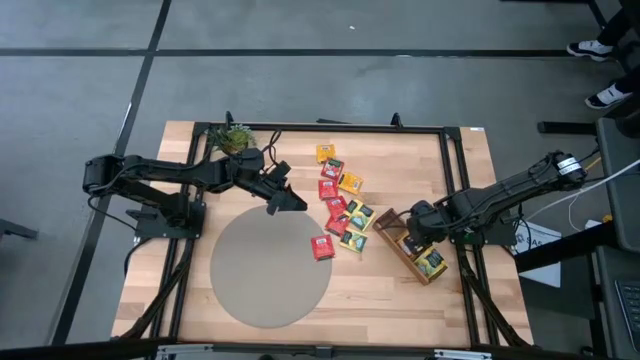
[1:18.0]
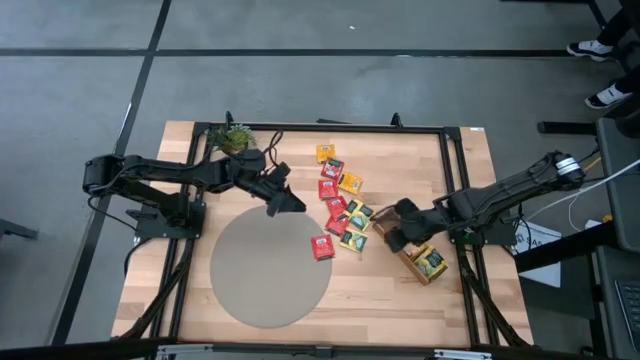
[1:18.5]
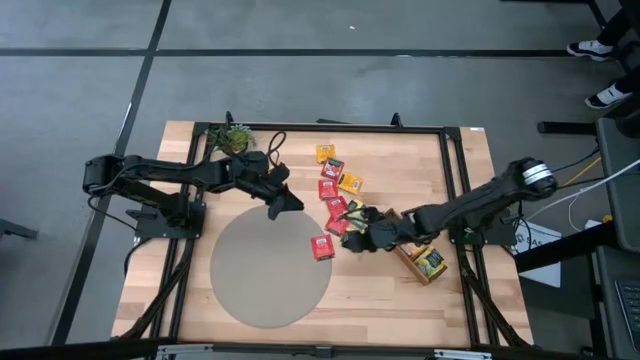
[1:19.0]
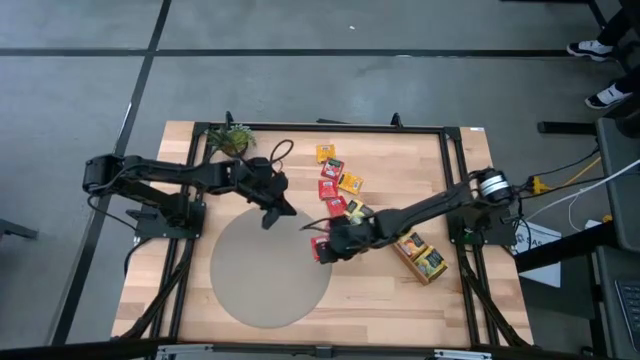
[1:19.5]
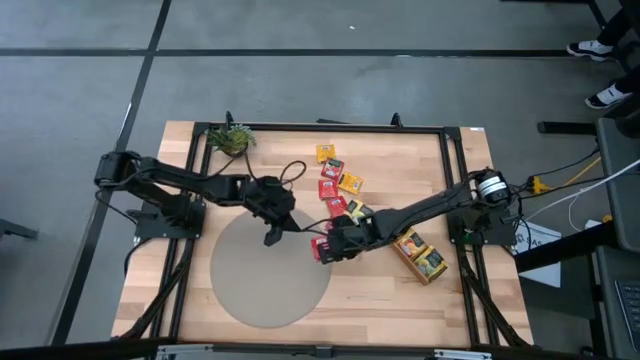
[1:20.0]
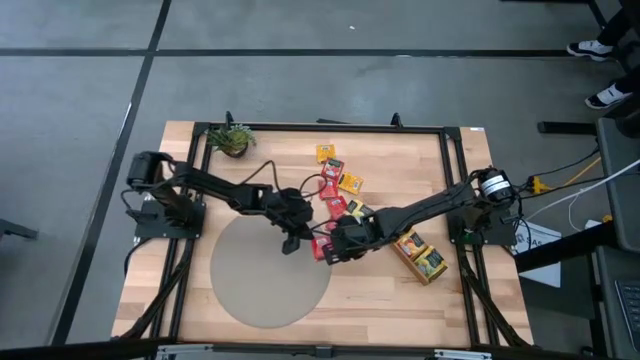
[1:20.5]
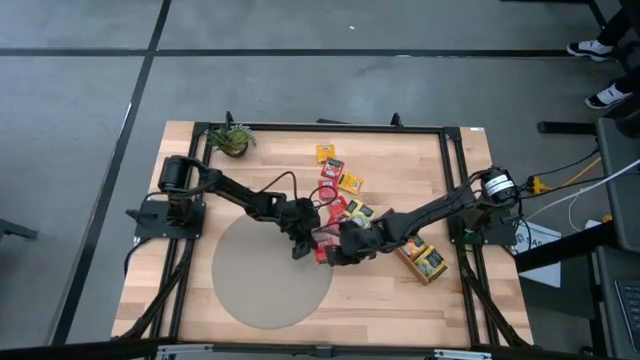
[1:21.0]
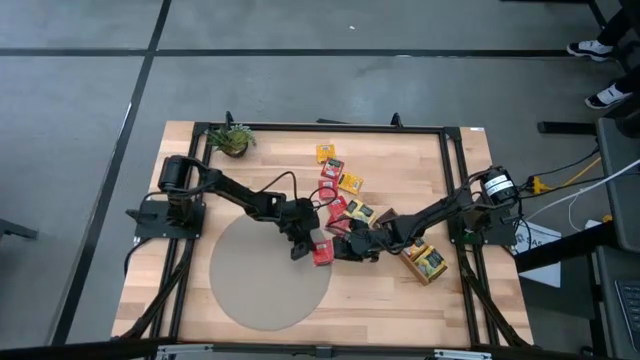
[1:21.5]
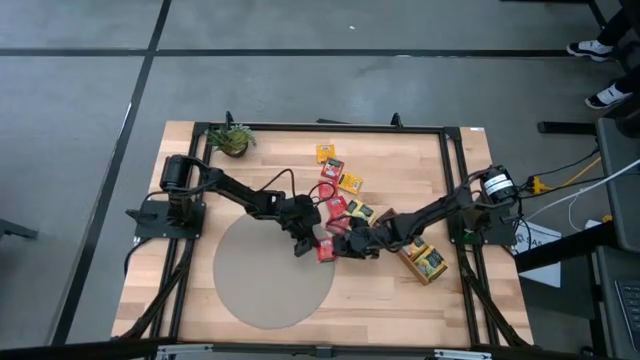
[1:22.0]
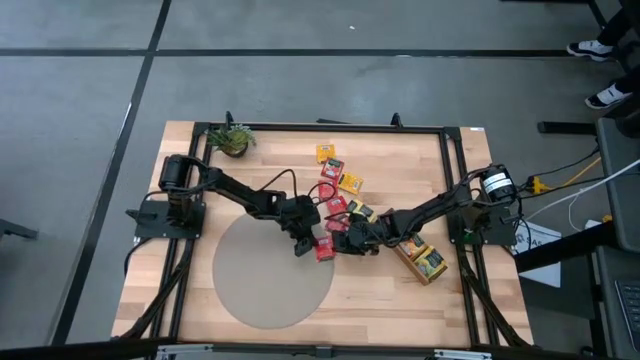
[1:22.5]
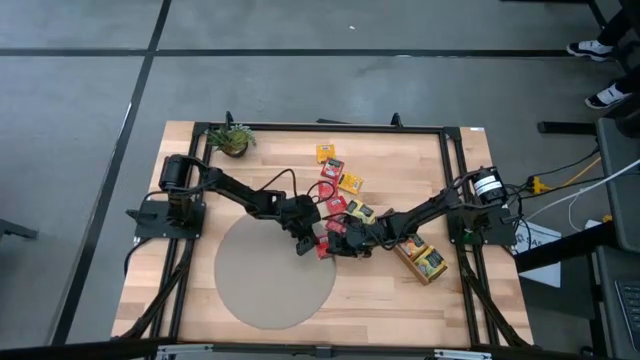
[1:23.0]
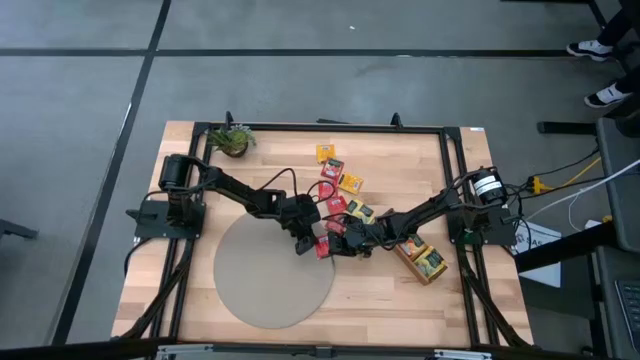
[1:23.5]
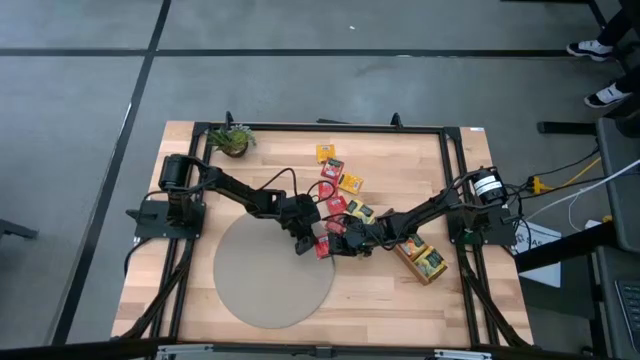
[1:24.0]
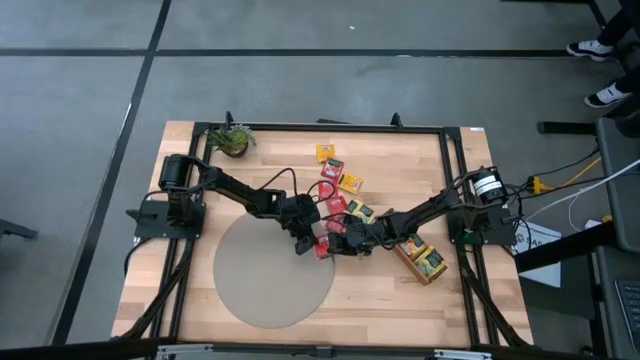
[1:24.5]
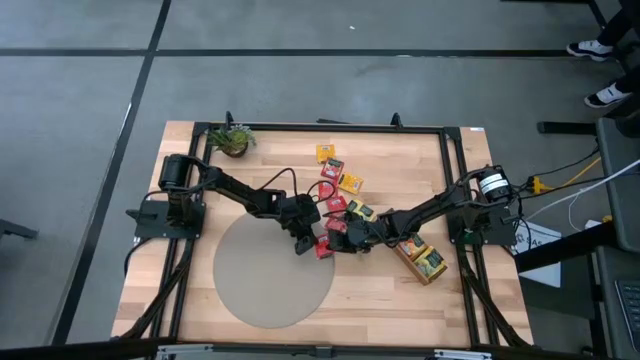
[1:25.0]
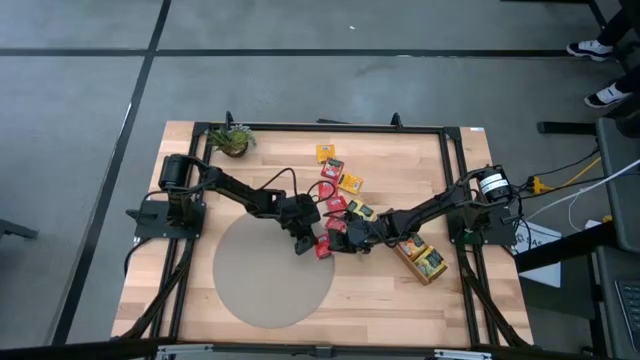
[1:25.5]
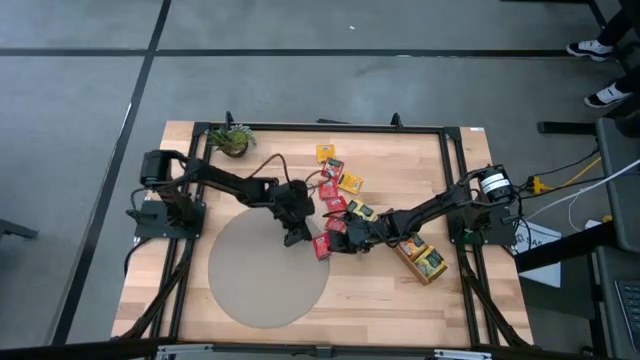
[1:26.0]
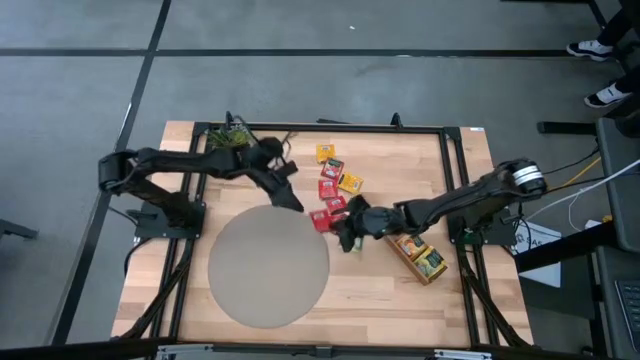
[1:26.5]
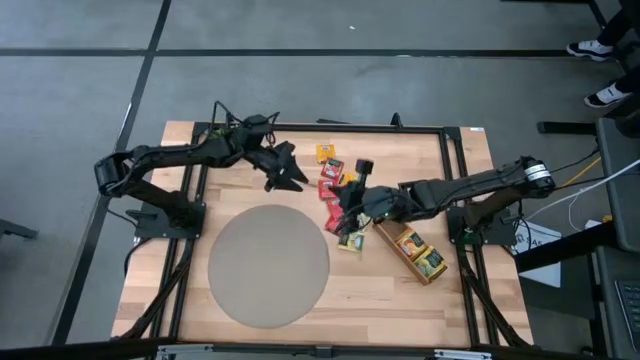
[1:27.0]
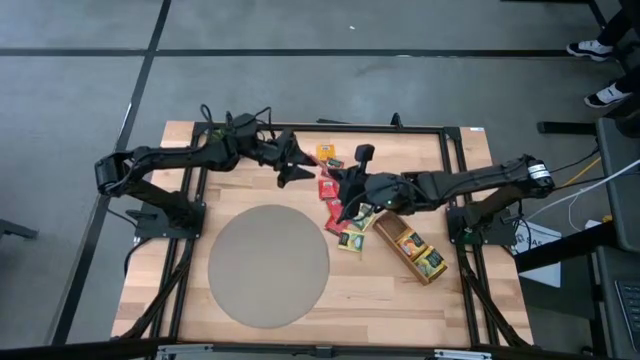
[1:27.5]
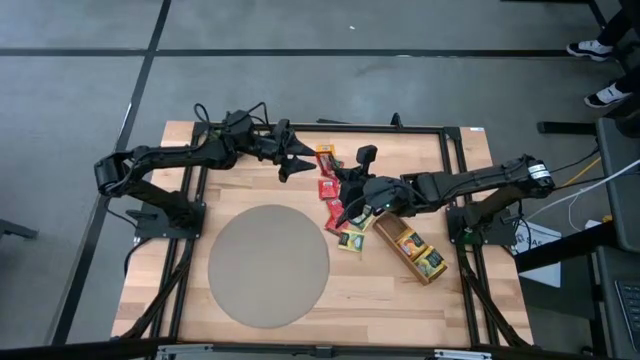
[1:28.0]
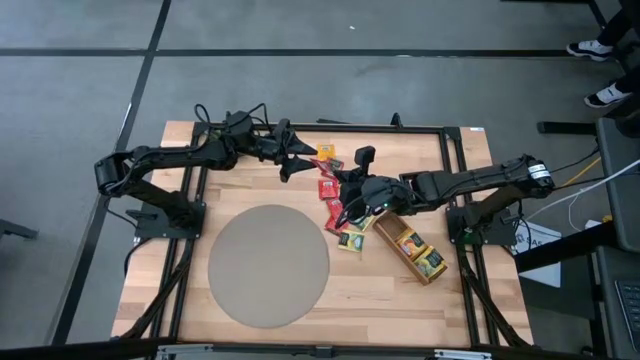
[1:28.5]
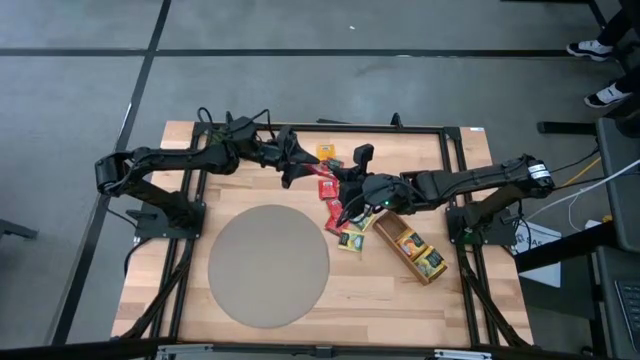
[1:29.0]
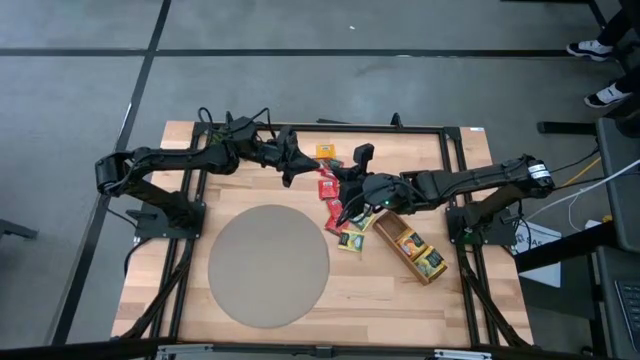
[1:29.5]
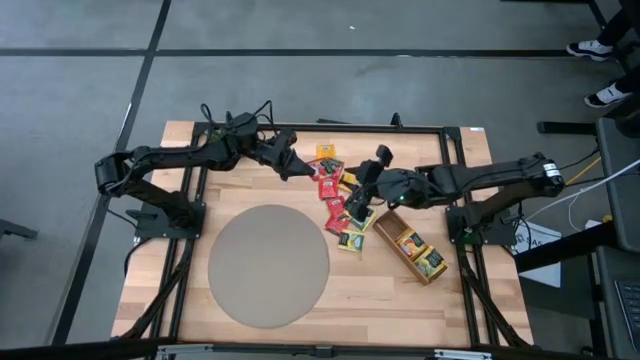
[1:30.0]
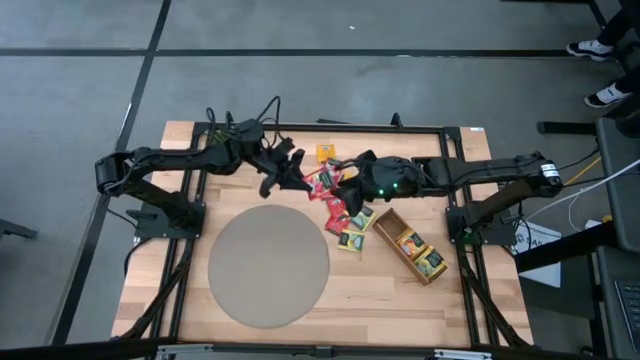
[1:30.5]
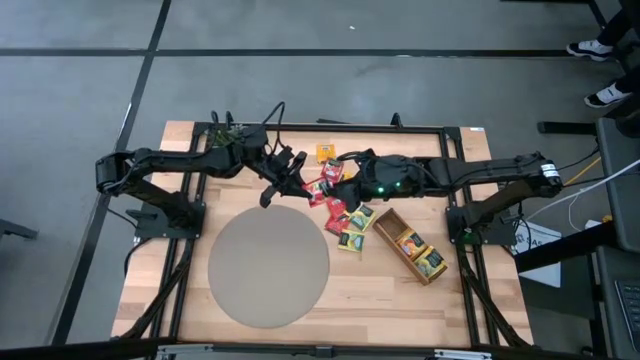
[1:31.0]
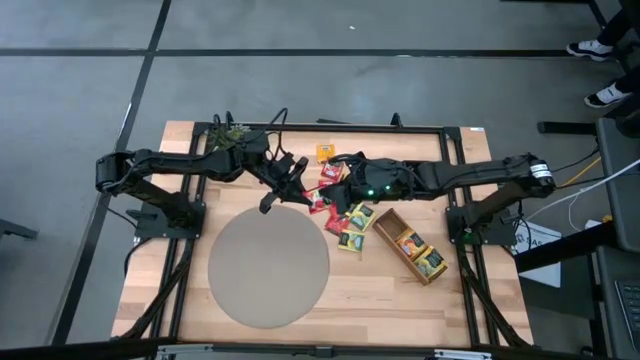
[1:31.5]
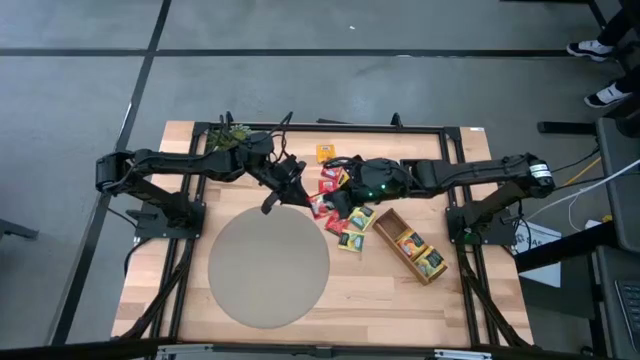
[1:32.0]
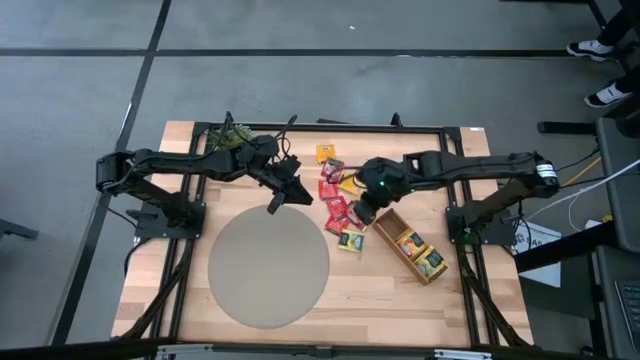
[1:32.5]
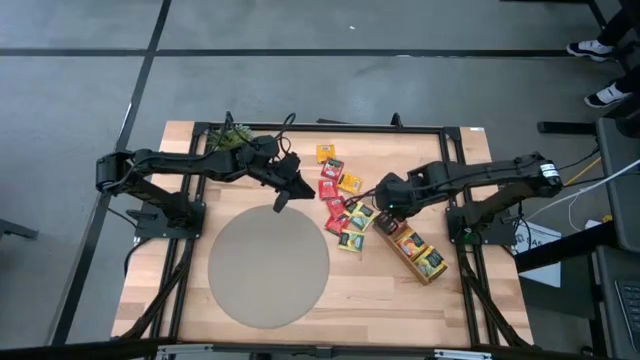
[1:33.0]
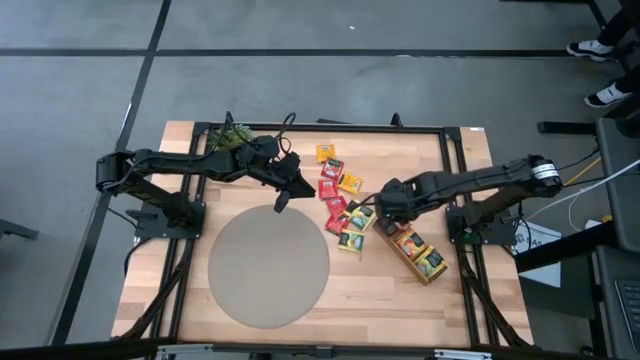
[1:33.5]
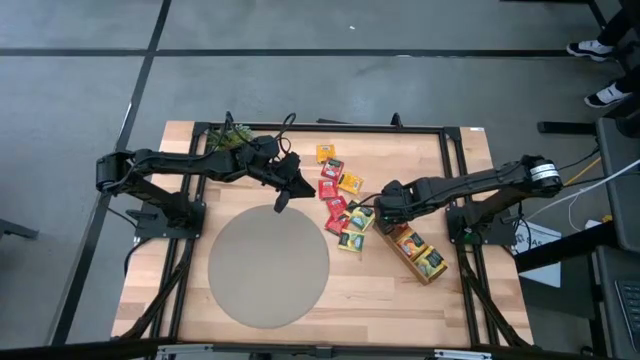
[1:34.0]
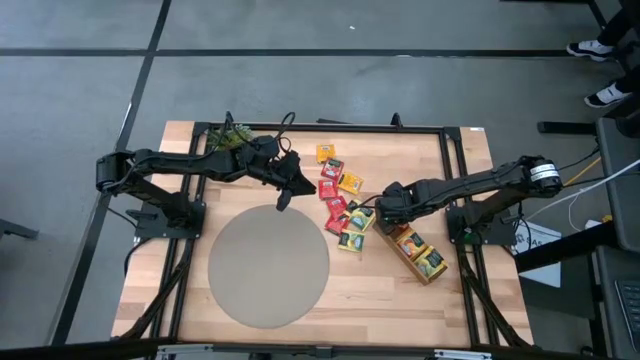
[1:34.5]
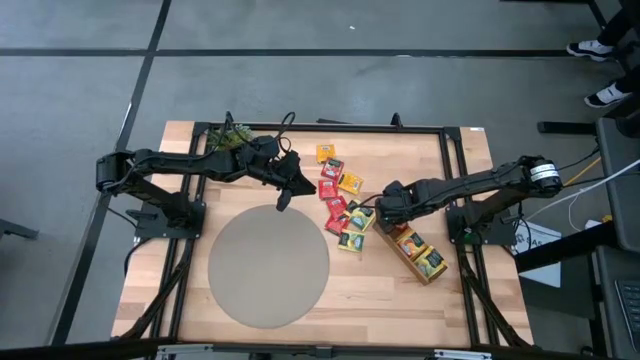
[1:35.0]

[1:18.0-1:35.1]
Task: Pick & Place Tea
Put the red tea bag into the top section of the wooden organizer

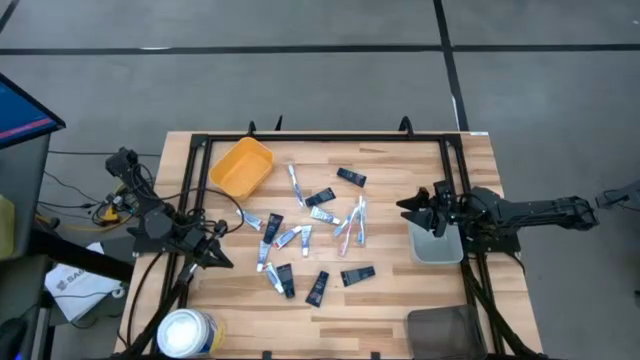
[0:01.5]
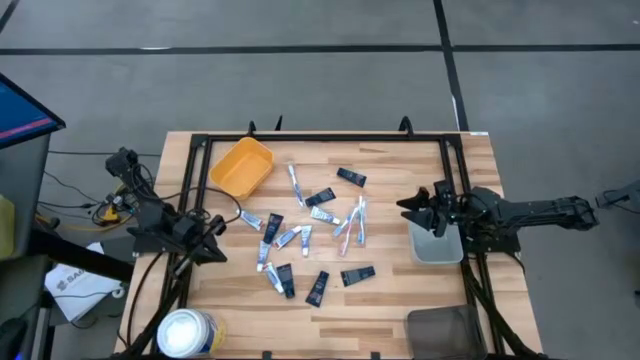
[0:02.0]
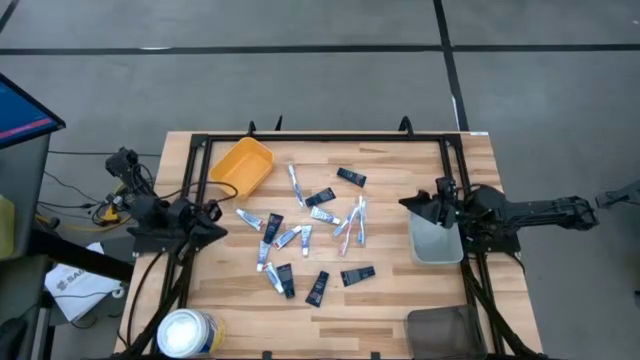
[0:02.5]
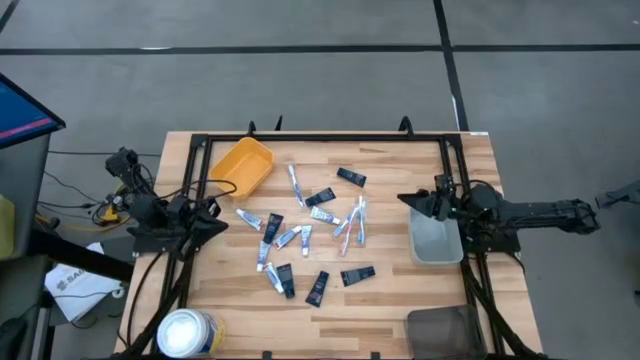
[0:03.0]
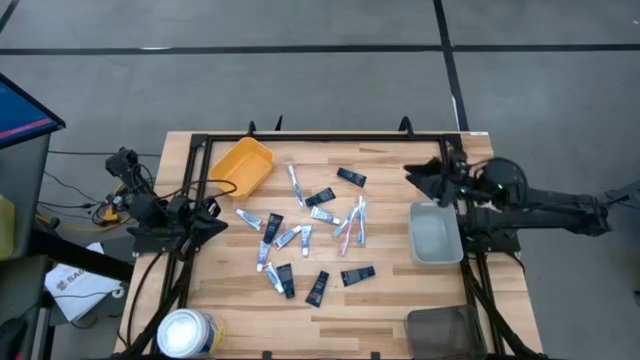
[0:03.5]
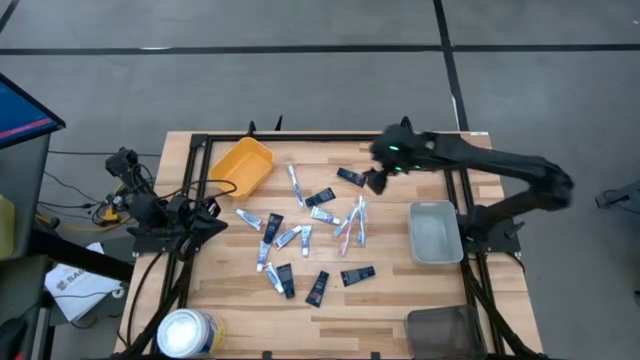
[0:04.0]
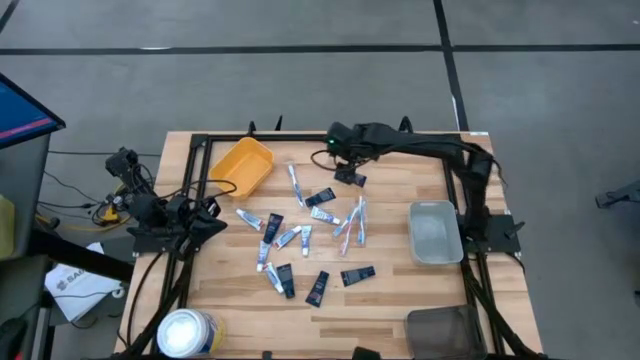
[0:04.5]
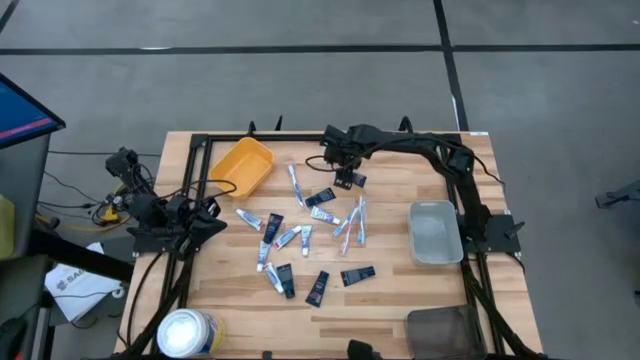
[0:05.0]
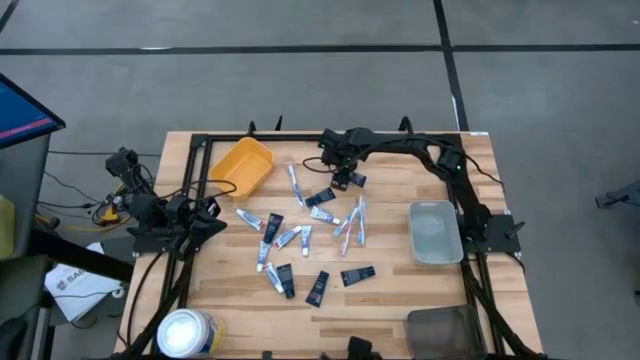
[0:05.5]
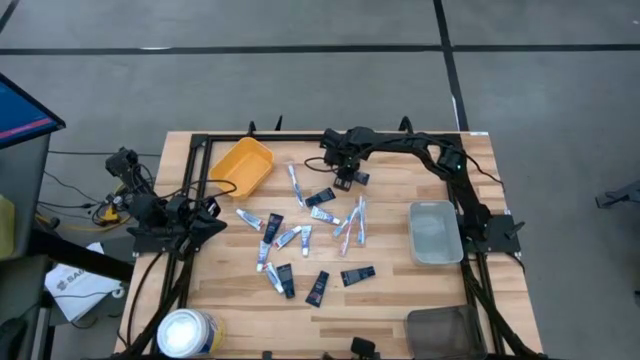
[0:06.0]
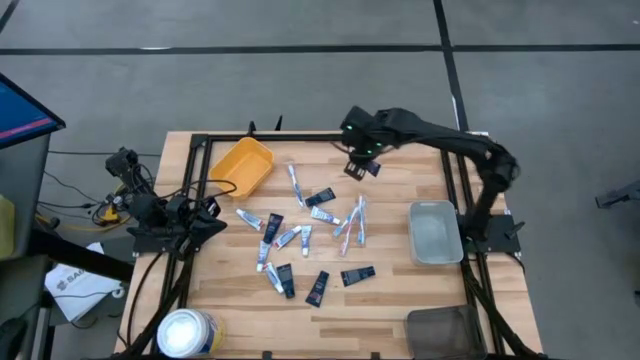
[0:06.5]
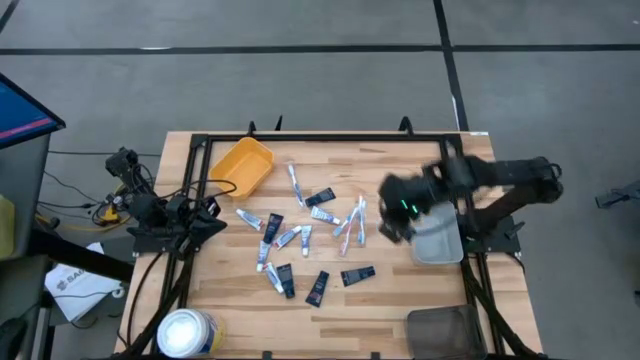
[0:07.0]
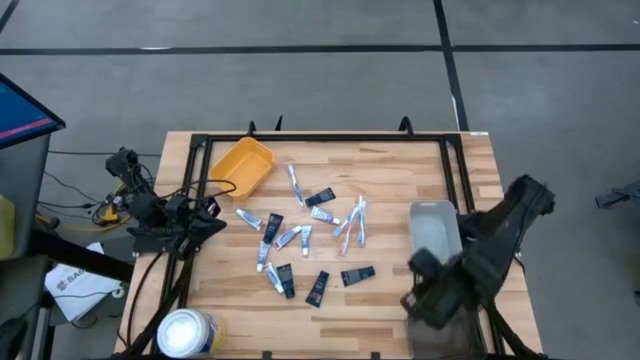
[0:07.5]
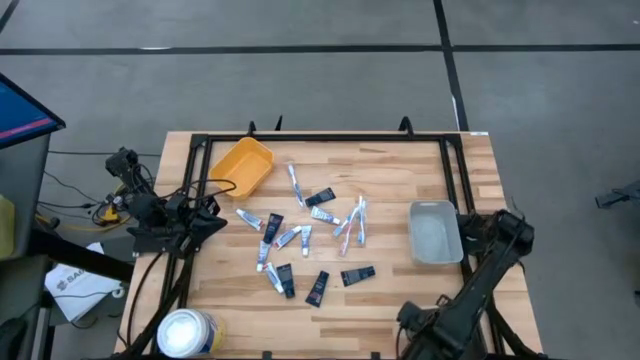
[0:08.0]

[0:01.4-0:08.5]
Task: Pick & Place Travel size toiletries
Put the blue shave cream into the black bin
